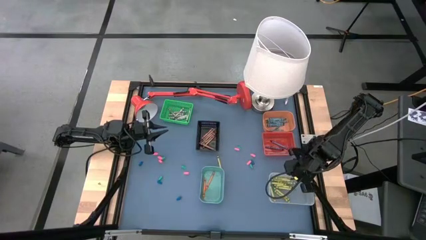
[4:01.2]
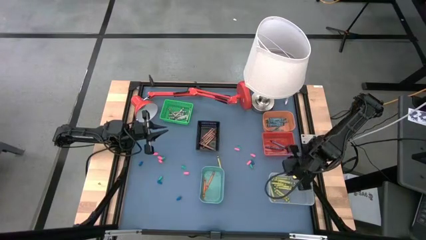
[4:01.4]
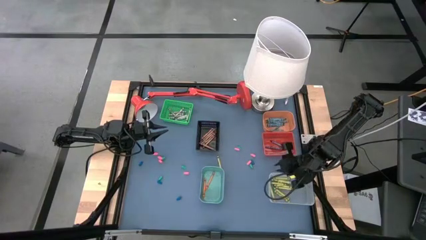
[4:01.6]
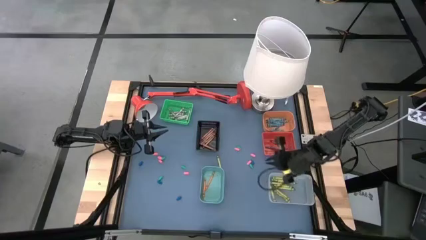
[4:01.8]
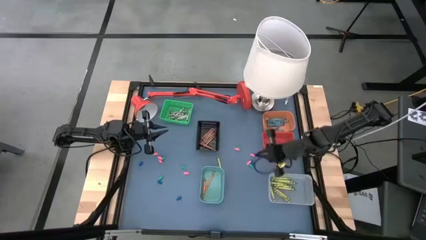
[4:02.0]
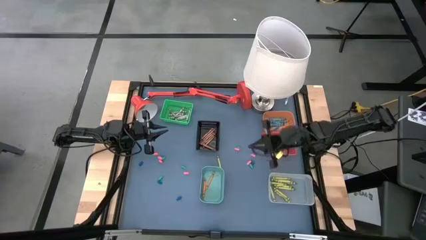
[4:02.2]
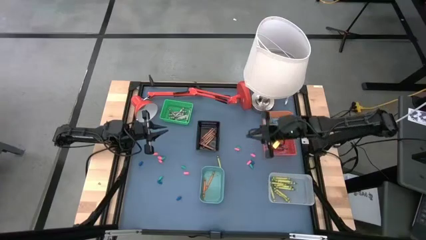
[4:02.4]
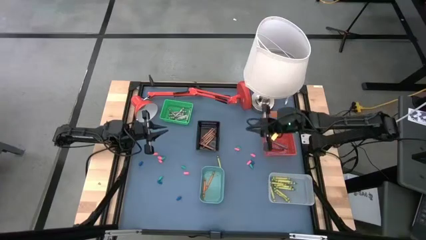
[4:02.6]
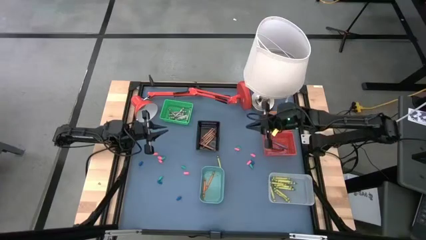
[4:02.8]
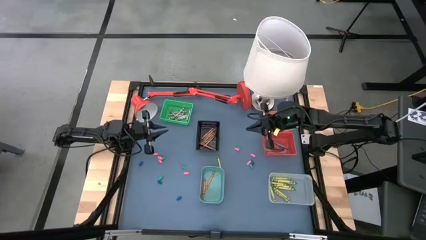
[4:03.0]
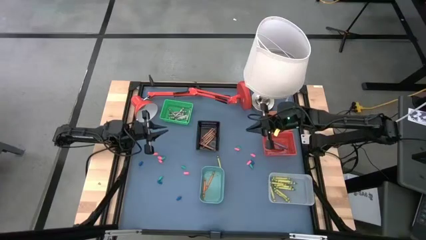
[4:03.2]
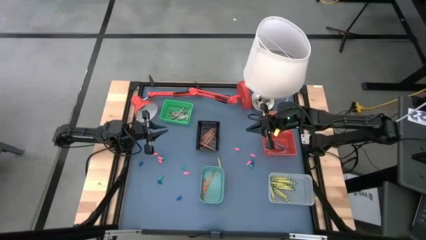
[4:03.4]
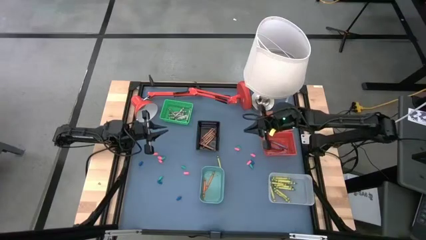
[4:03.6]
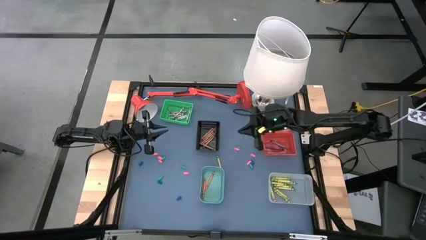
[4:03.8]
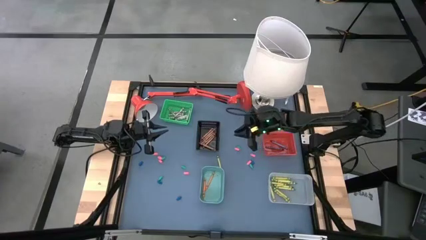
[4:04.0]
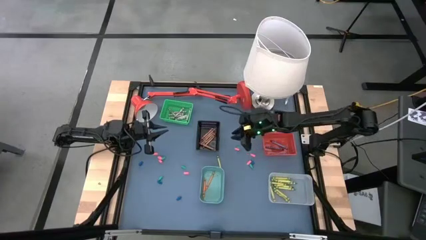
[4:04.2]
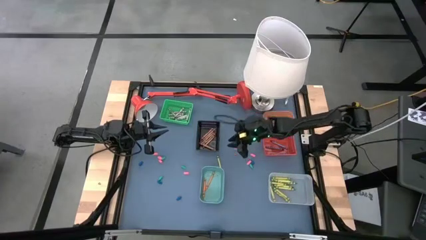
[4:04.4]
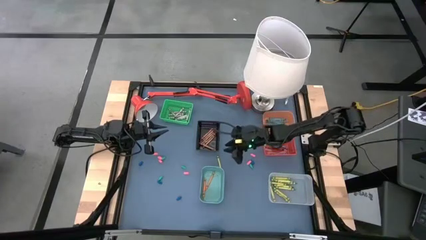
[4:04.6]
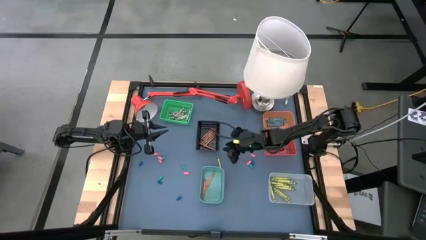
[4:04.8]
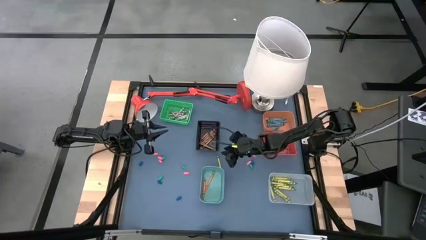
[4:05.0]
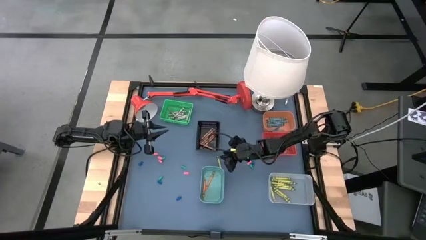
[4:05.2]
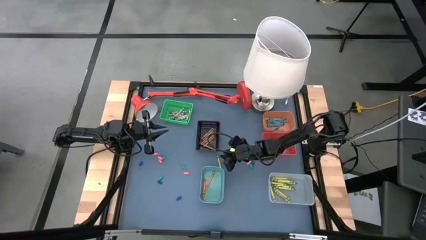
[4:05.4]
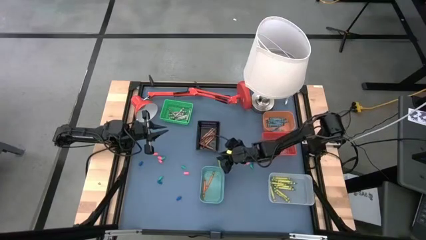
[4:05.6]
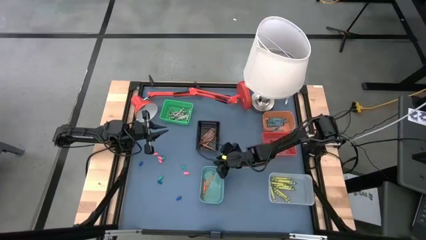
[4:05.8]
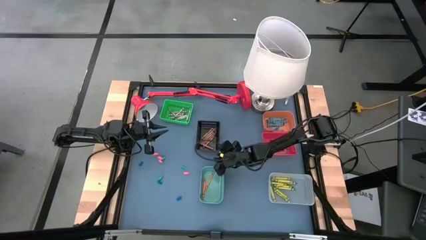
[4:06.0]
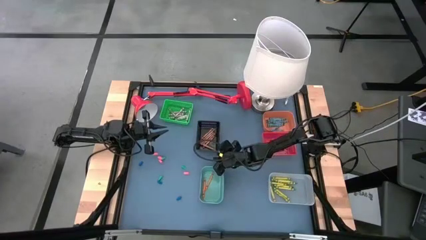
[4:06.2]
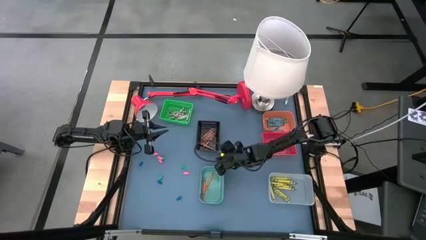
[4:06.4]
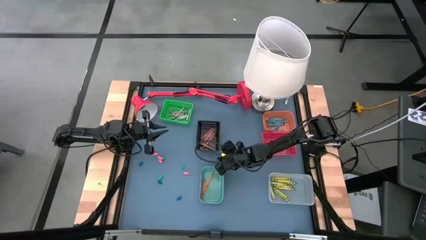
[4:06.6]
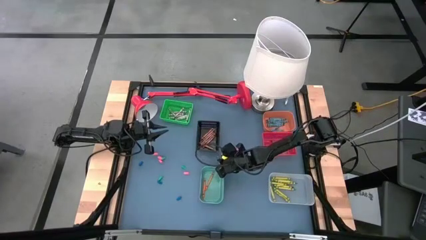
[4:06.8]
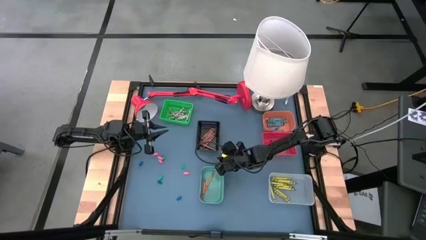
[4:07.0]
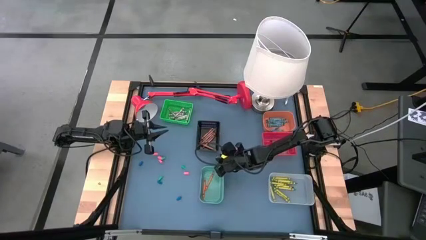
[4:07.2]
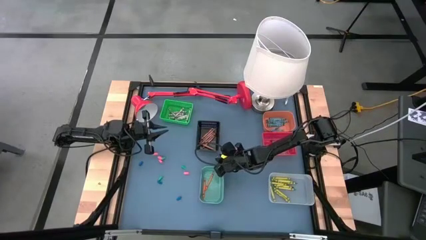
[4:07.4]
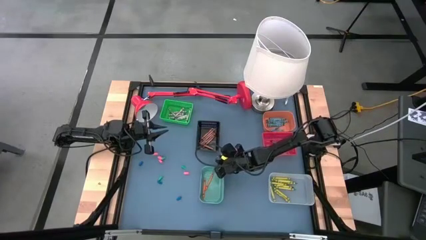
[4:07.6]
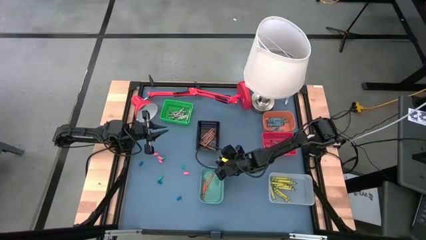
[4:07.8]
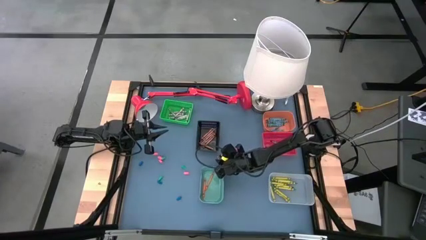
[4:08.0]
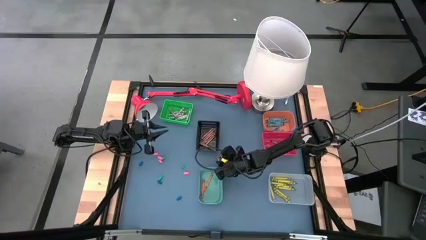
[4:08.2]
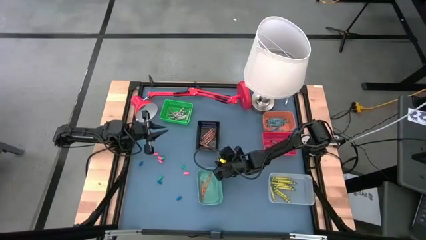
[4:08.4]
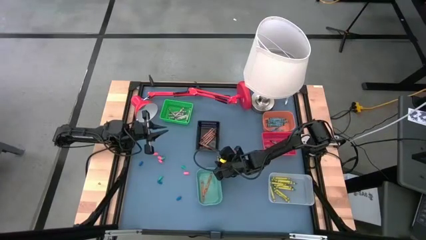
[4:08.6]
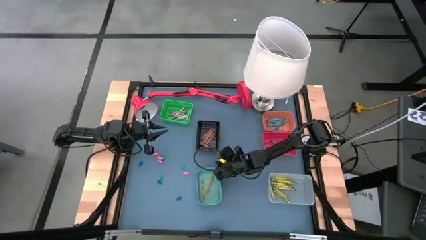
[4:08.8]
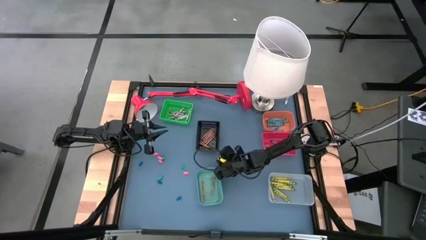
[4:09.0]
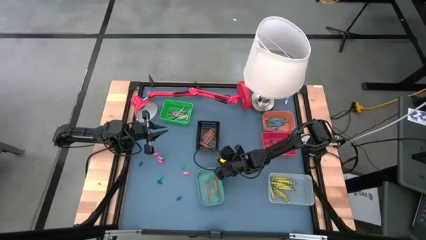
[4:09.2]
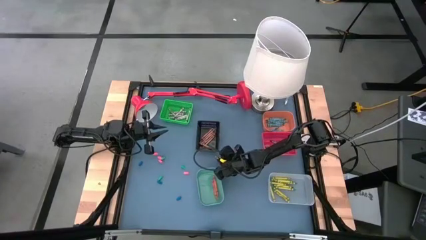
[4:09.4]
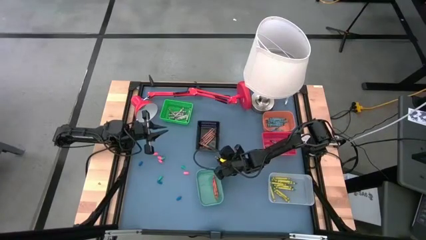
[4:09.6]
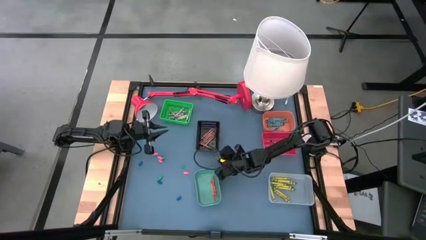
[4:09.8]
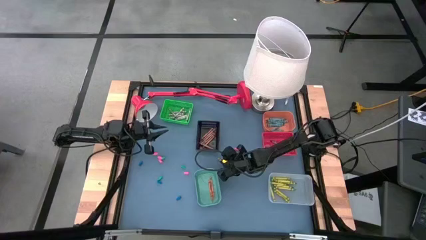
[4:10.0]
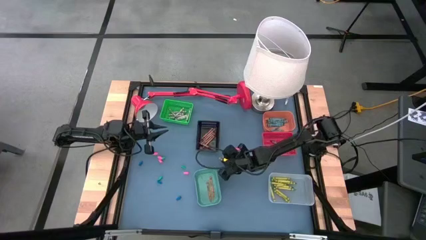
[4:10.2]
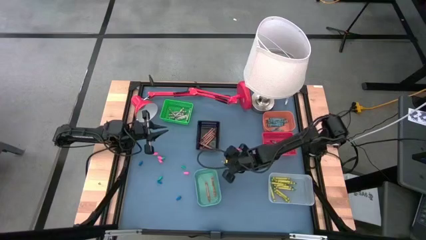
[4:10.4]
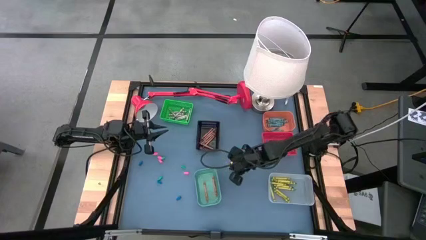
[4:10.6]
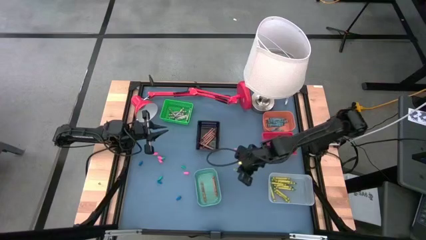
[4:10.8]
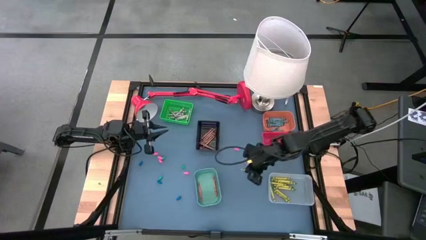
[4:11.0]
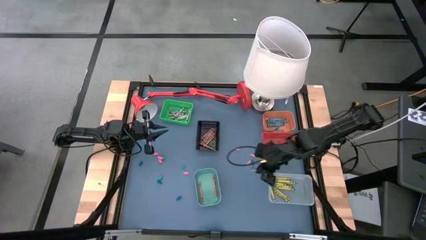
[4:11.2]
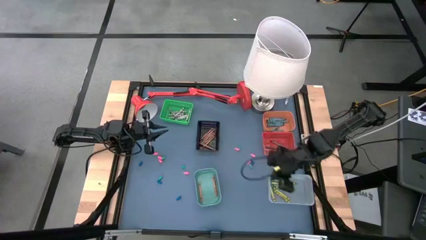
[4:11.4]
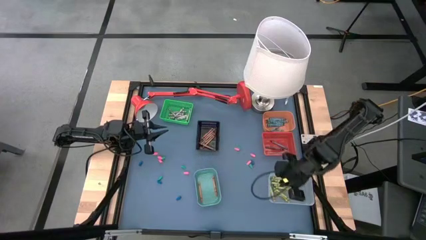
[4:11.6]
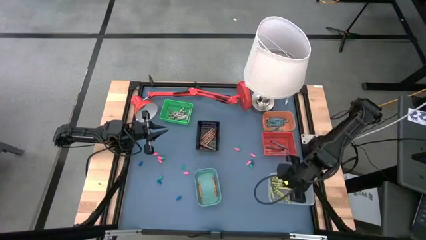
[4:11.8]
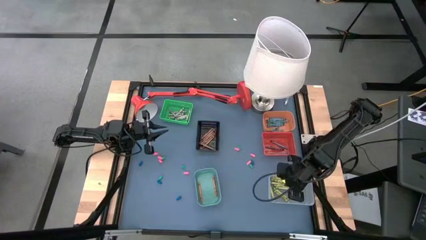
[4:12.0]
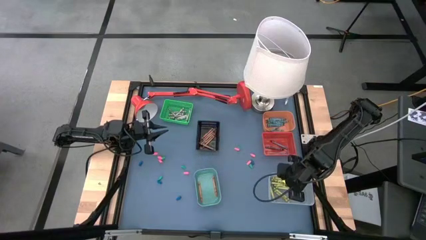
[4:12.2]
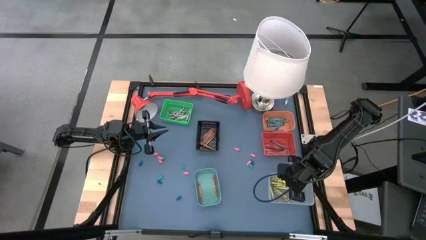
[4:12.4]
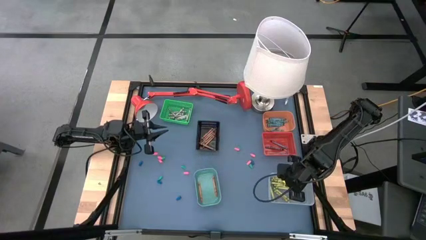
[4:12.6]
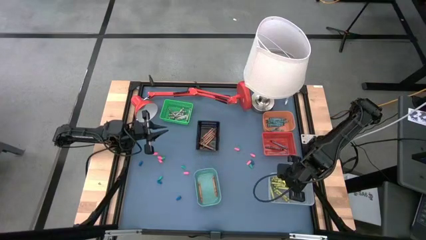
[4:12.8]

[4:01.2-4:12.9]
Task: Sort crayons
Put the green crayon into the transparent bin

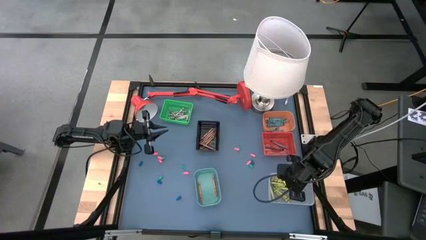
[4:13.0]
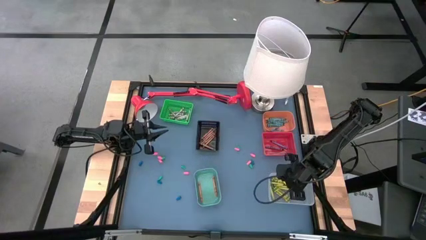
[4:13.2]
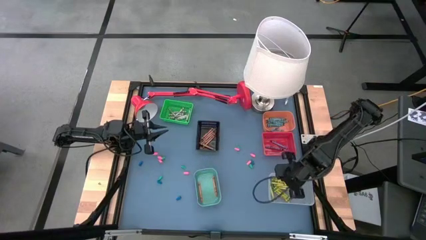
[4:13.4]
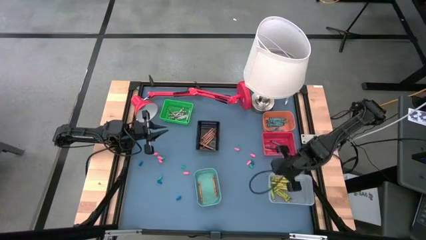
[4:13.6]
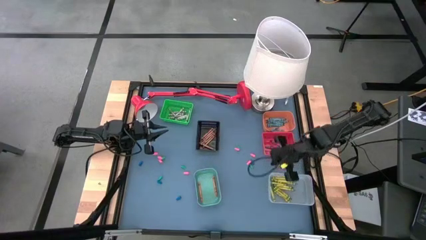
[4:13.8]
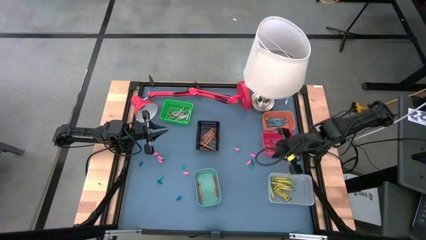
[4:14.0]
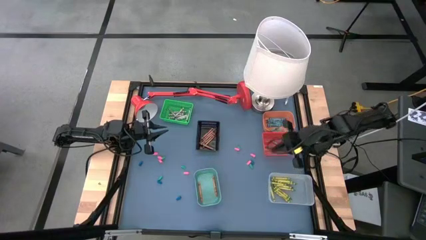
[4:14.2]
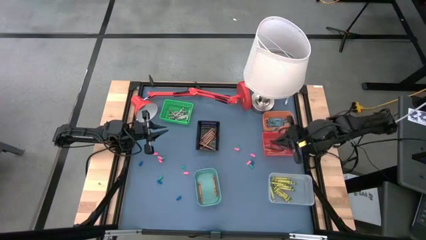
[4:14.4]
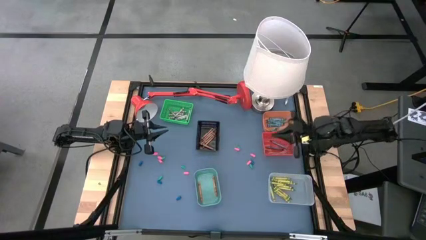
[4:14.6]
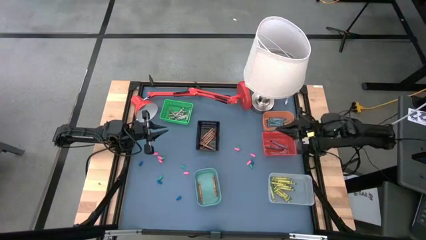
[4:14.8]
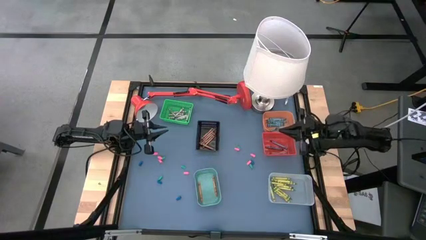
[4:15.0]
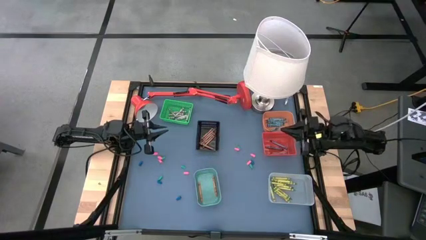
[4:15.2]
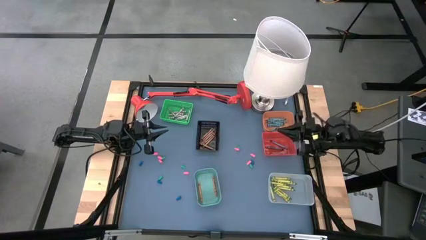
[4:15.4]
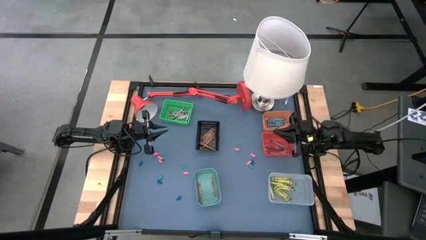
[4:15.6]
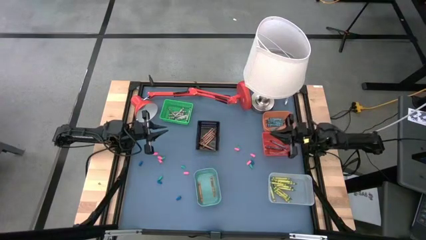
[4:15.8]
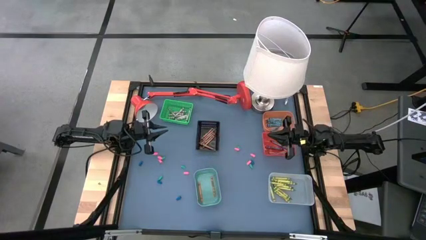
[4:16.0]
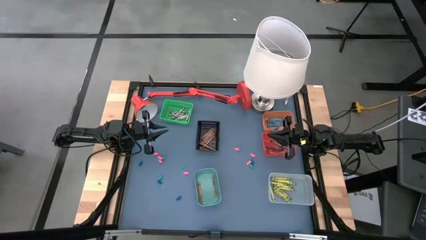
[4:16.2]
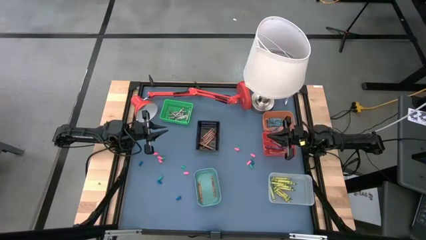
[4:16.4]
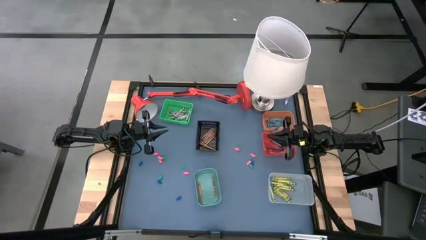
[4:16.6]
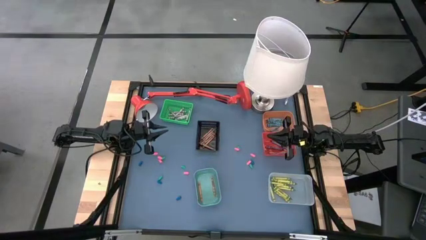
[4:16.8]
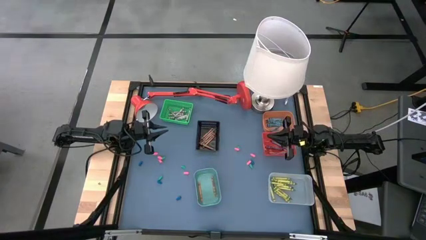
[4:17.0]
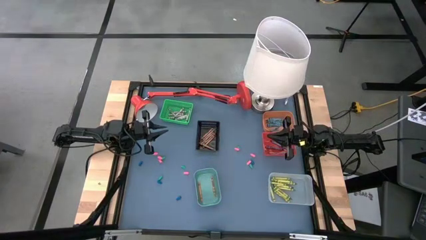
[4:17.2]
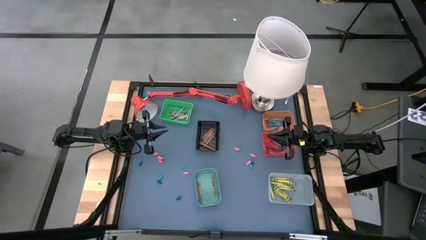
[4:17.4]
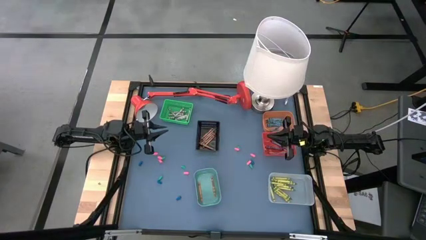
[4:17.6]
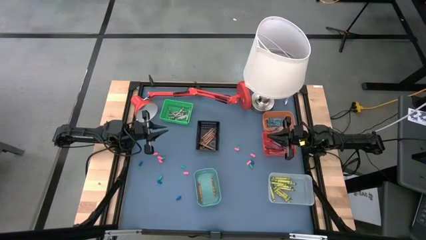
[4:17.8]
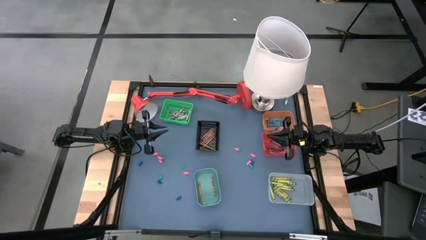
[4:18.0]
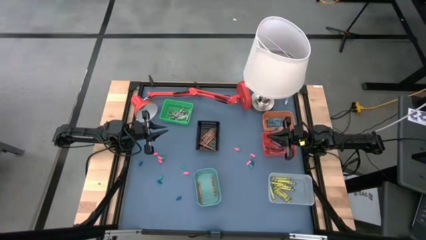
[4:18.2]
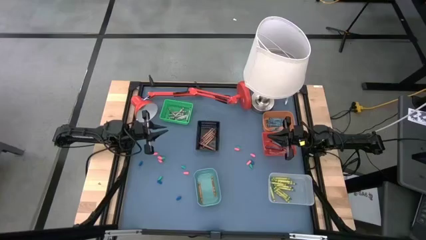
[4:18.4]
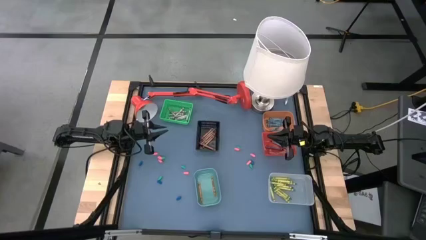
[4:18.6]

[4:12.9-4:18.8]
Return to Home Position
